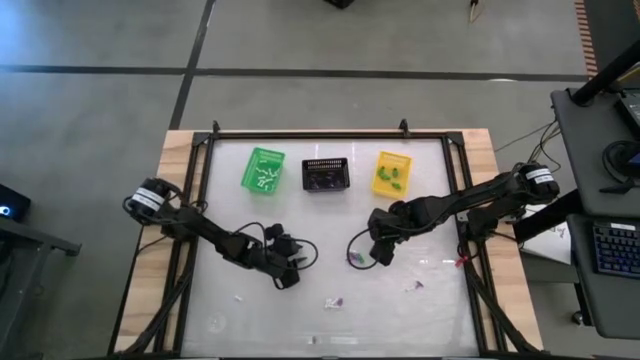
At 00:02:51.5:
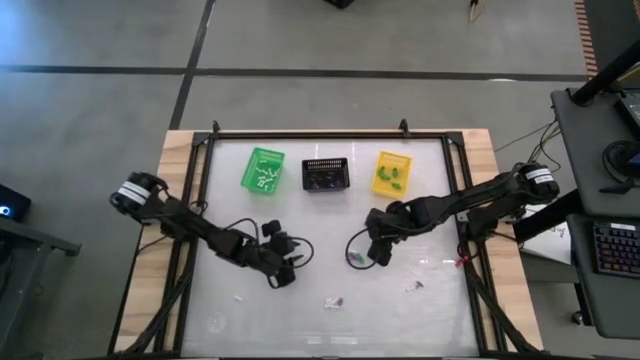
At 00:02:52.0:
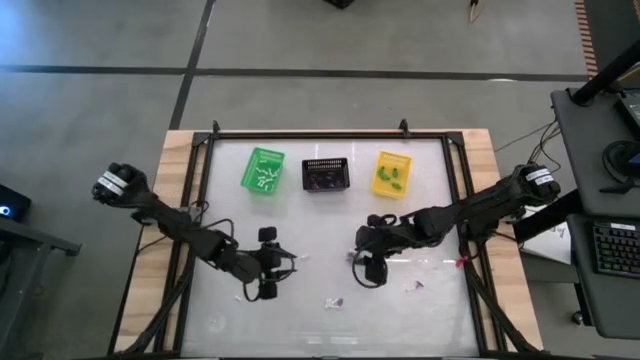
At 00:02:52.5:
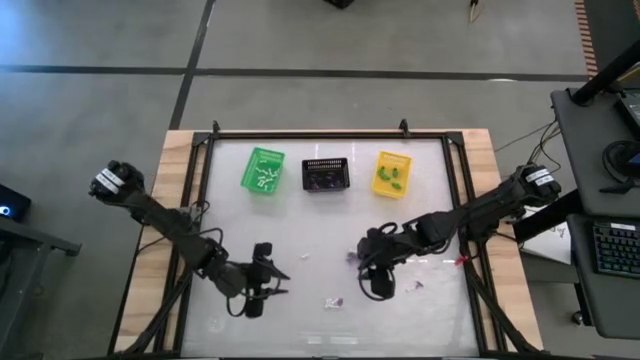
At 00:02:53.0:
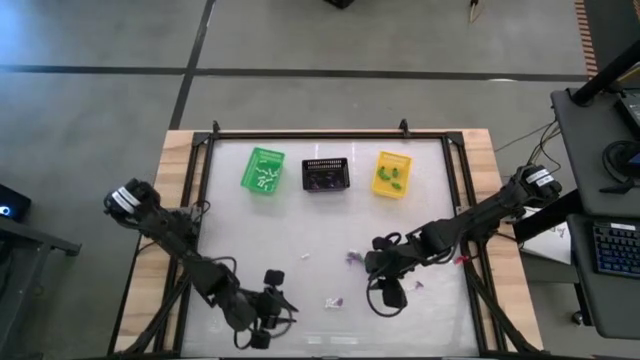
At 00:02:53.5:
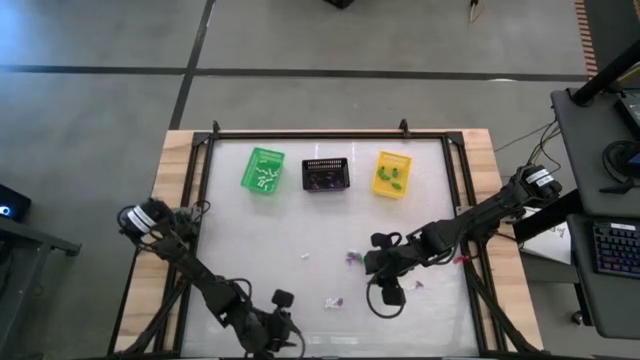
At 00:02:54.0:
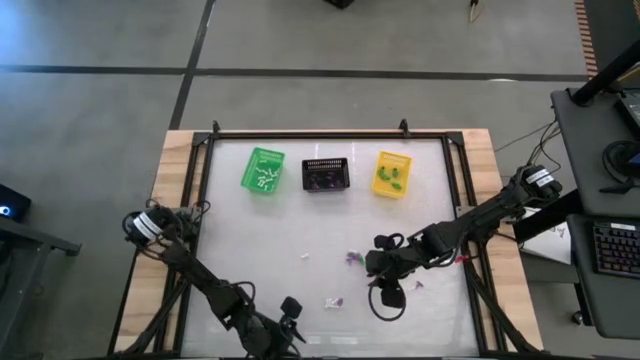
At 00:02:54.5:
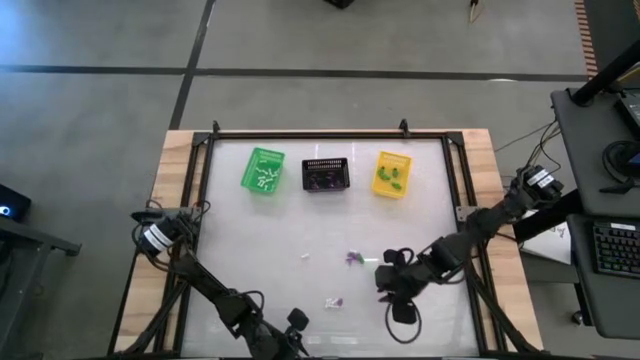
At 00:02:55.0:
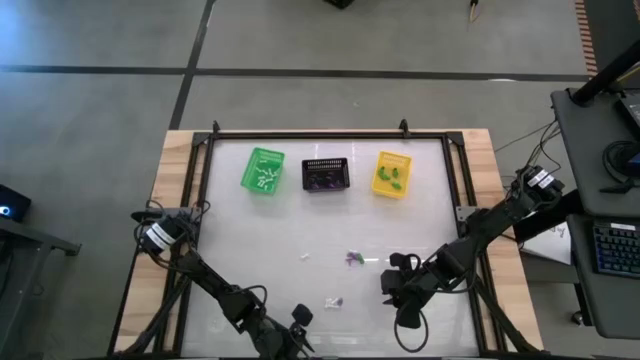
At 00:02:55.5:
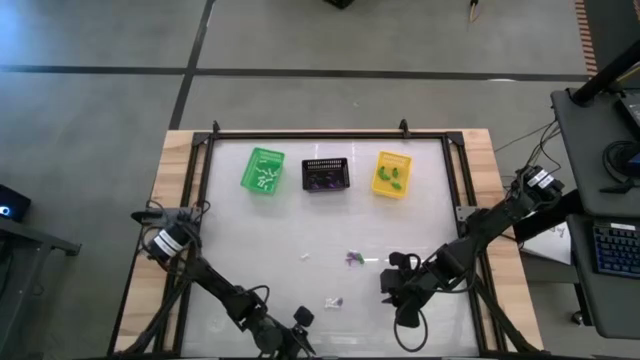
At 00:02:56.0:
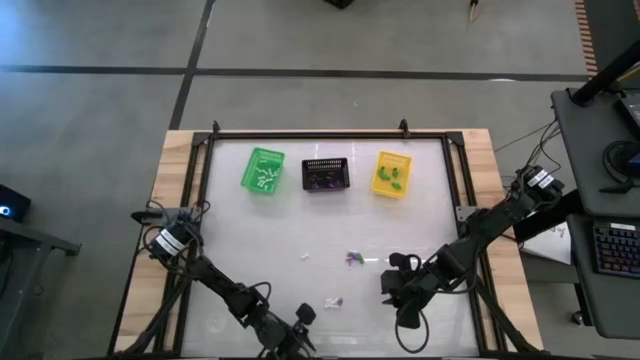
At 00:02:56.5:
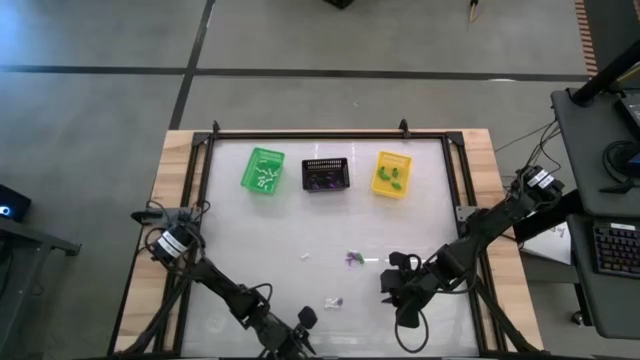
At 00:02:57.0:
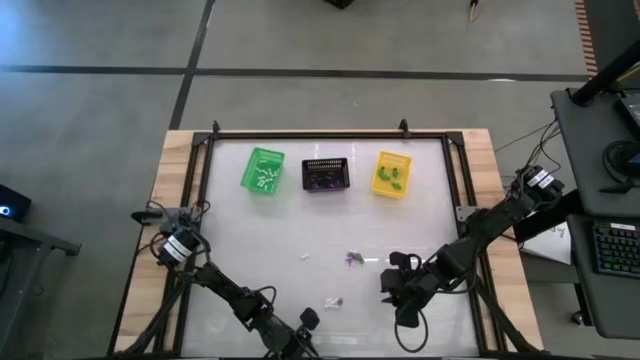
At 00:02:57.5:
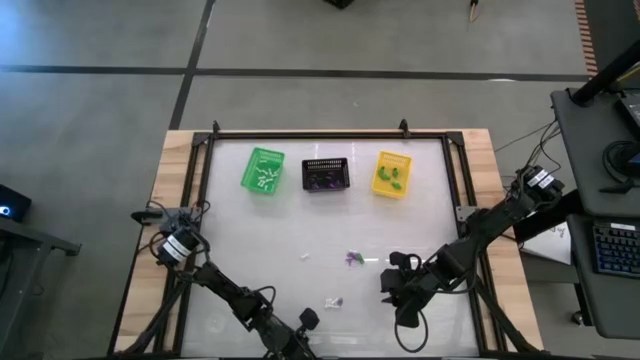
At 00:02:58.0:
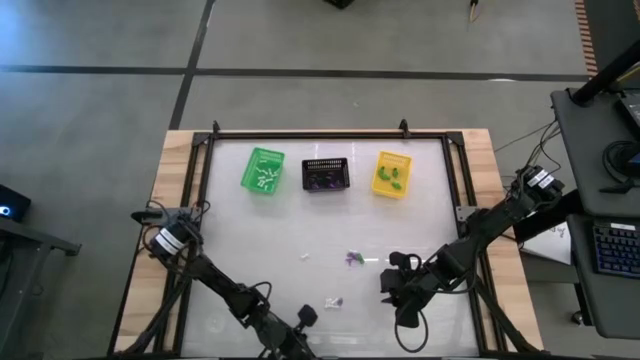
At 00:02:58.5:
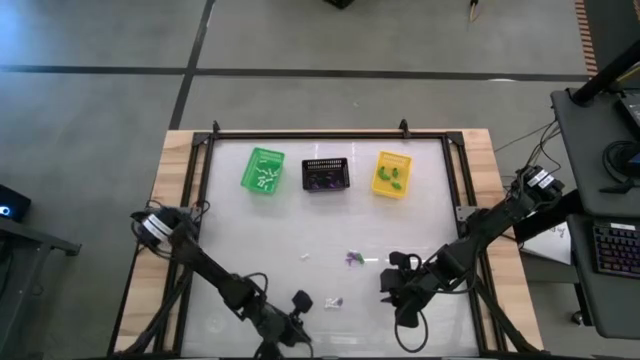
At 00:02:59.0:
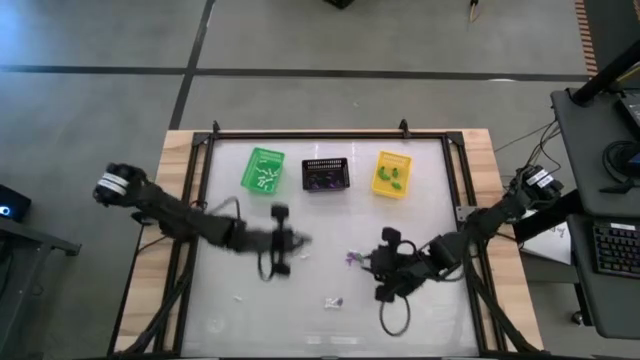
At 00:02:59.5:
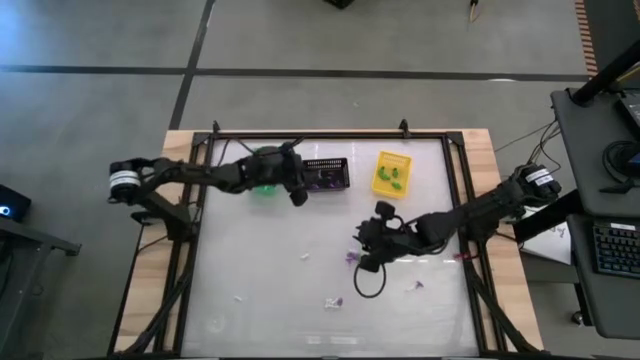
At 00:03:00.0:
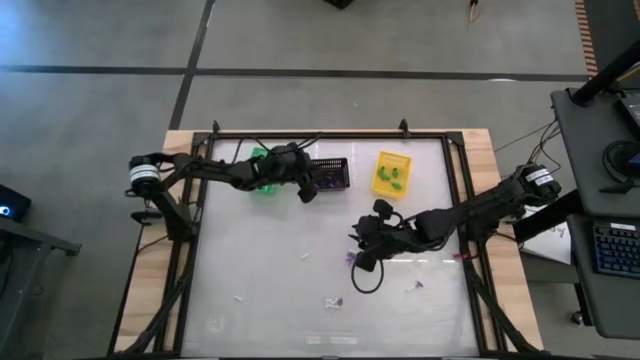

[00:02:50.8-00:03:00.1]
Task: Sort Halloween decoration
Put the purple witch hat toy into the black basket

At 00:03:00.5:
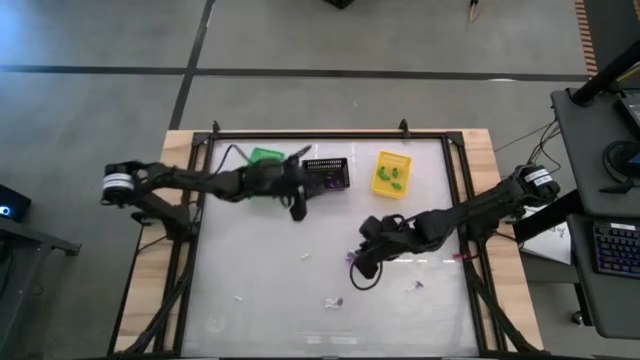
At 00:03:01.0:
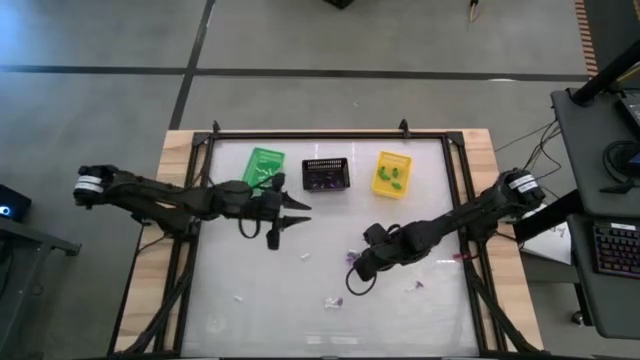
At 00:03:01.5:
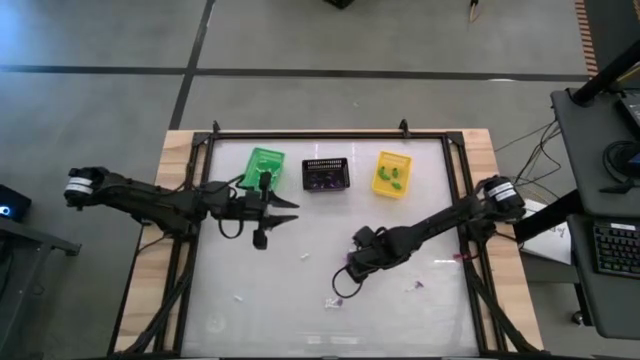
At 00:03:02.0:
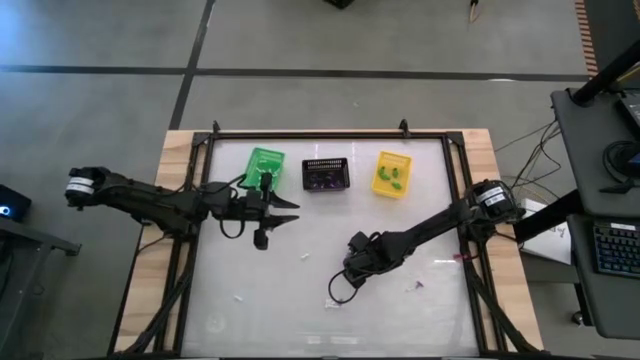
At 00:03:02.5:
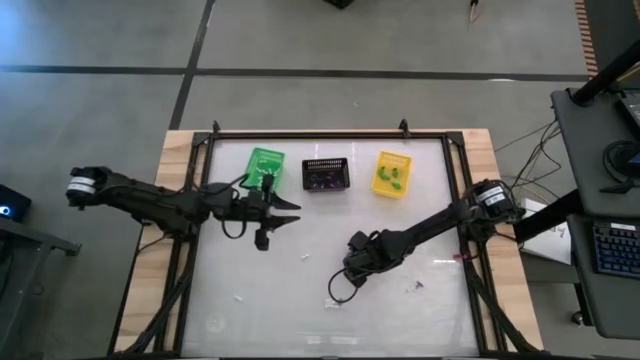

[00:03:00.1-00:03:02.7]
Put the green skeleton toy into the yellow basket

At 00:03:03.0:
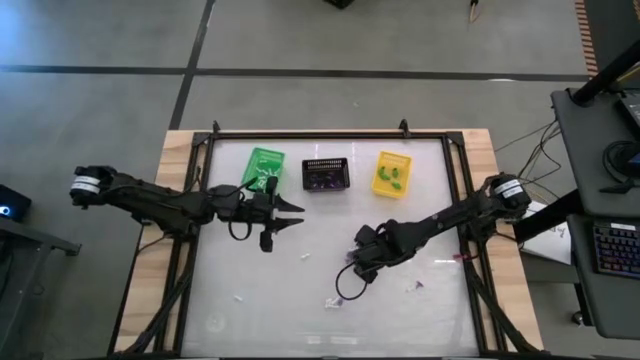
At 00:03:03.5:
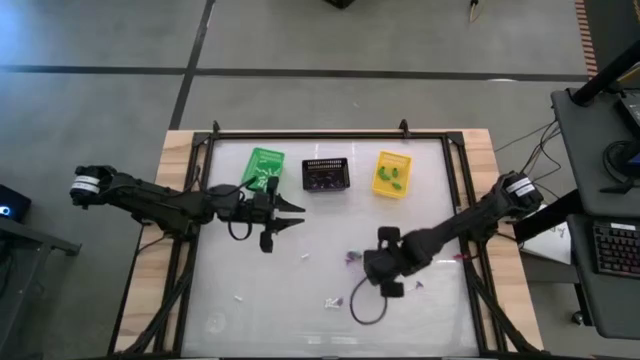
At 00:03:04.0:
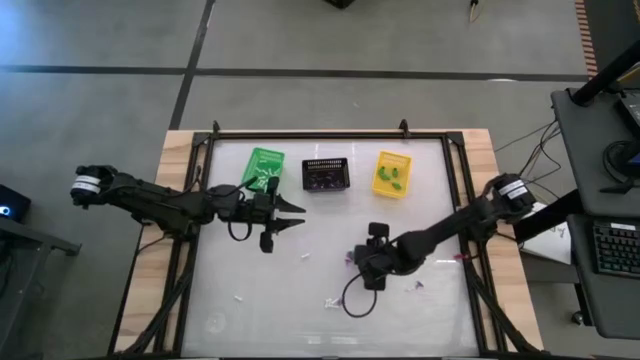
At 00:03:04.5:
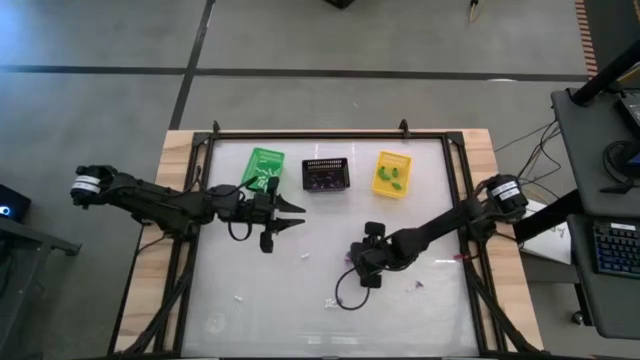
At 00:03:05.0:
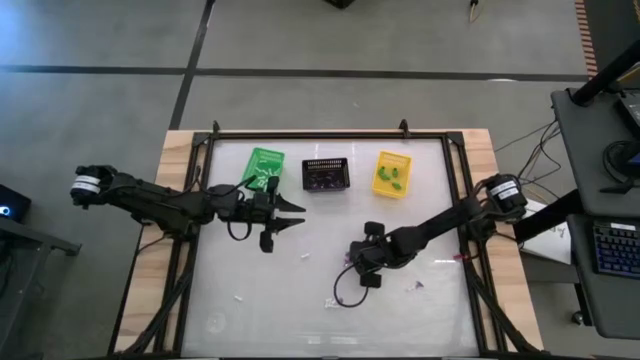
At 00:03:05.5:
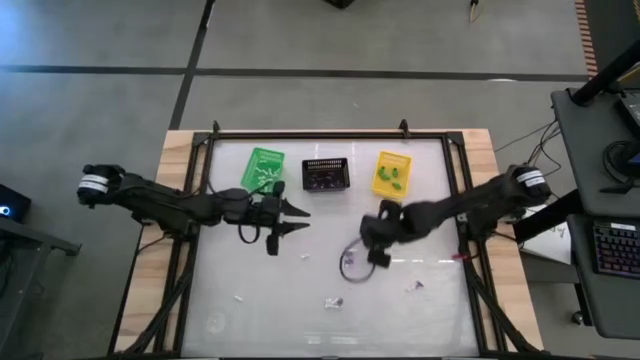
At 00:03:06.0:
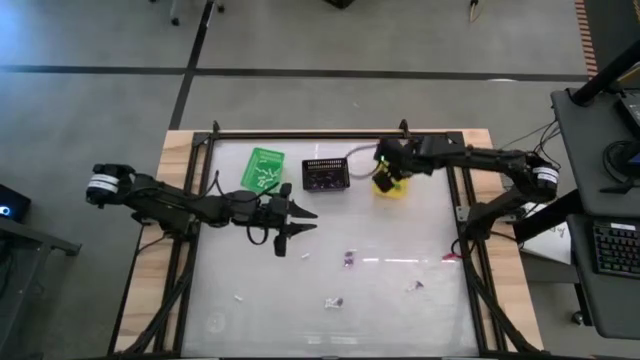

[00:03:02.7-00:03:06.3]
Put the green skeleton toy into the yellow basket

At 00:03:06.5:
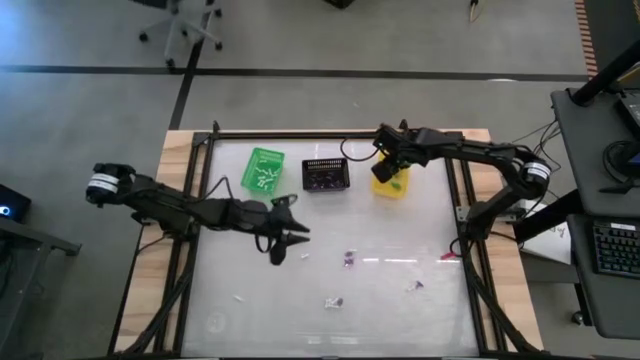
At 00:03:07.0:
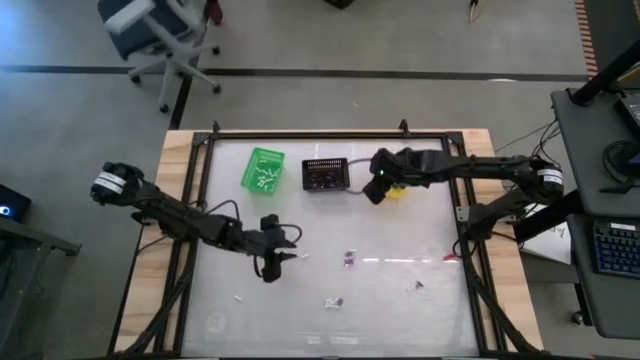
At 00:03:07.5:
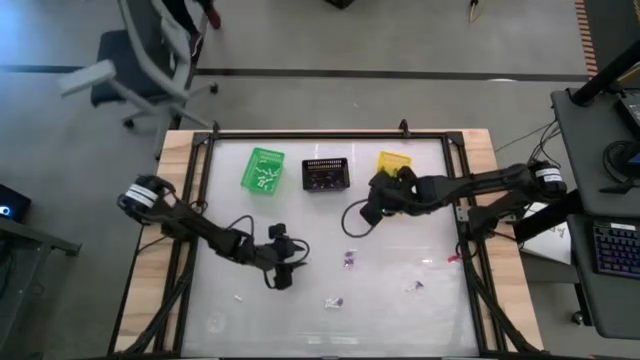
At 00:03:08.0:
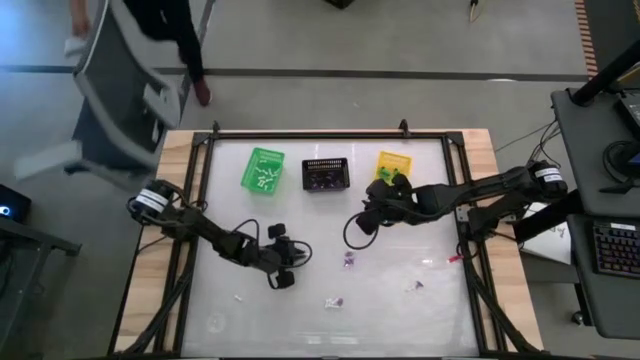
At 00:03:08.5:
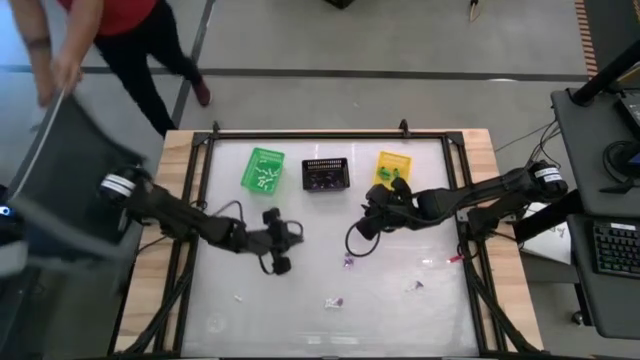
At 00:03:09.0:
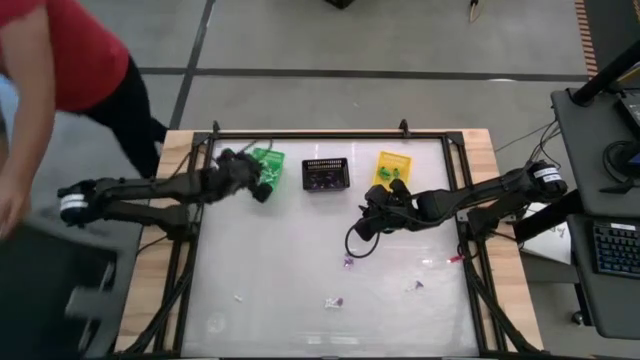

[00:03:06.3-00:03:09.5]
Put the white bone toy into the green basket

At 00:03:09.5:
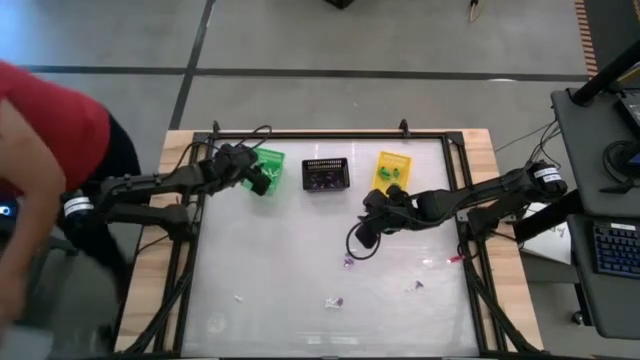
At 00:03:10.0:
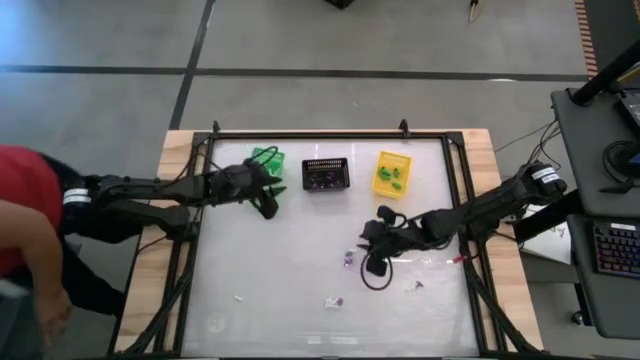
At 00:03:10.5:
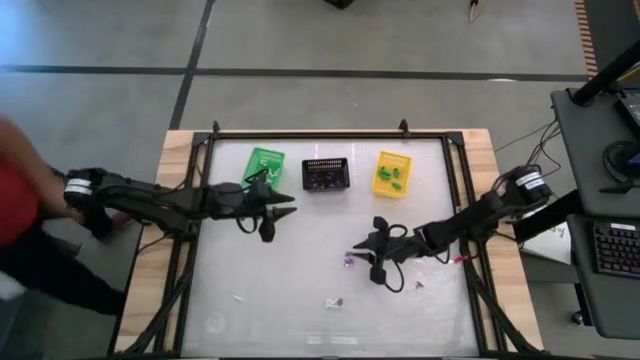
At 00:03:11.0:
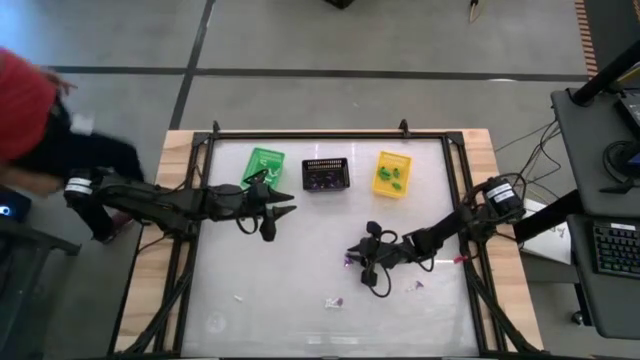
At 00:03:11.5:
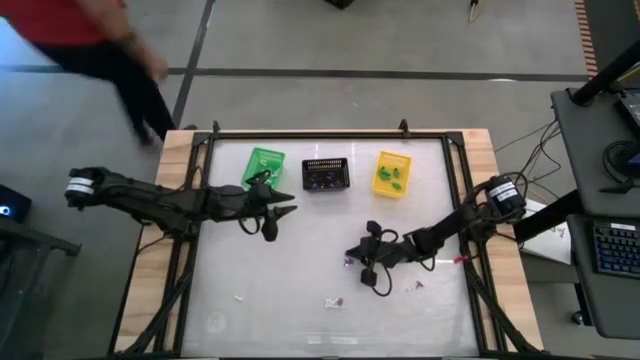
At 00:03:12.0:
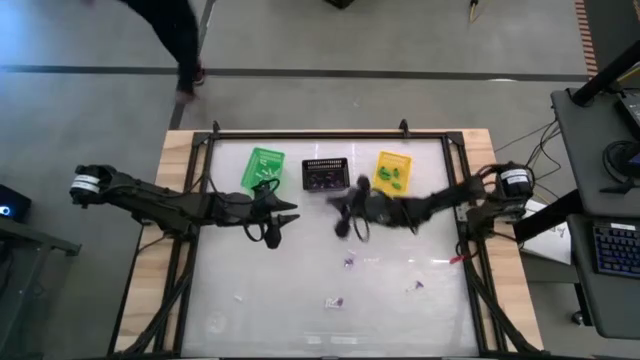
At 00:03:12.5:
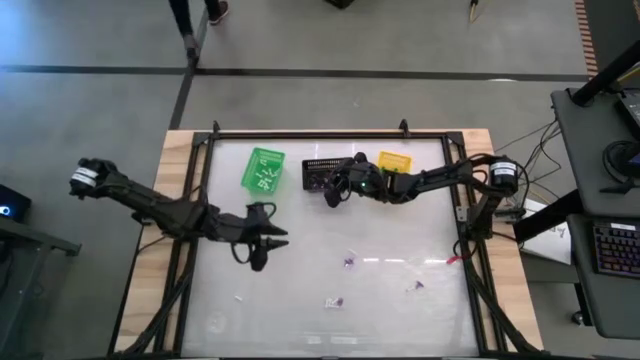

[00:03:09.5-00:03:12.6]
Put the purple witch hat toy into the black basket
